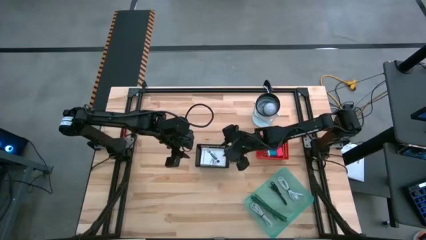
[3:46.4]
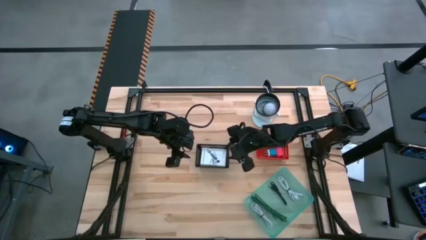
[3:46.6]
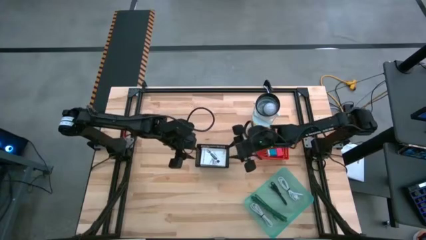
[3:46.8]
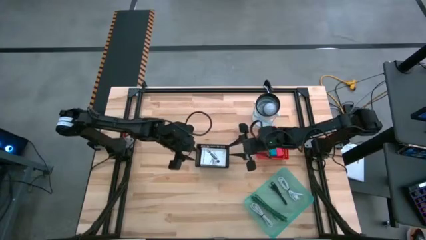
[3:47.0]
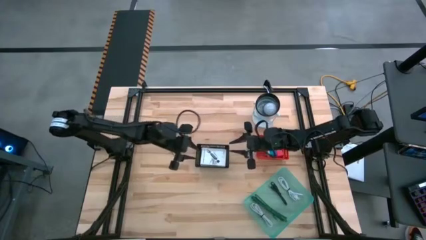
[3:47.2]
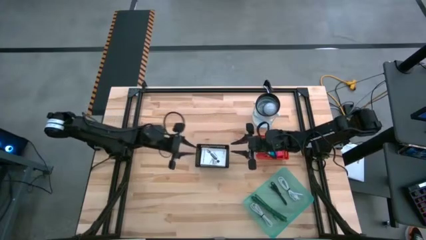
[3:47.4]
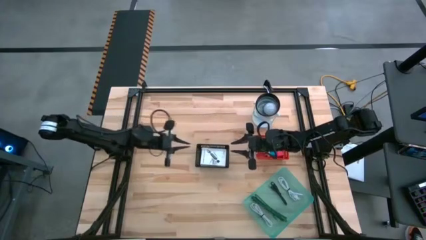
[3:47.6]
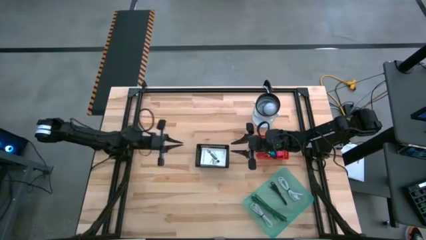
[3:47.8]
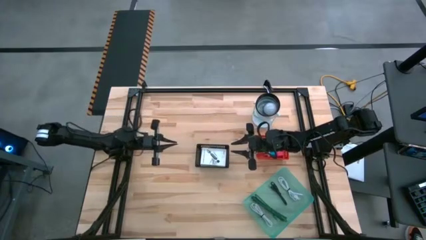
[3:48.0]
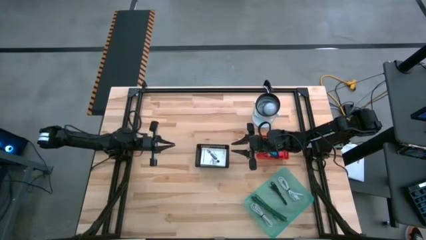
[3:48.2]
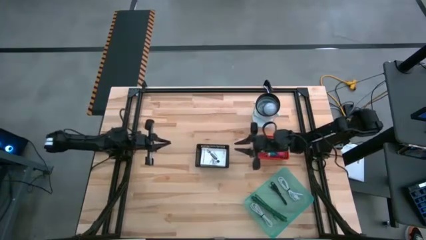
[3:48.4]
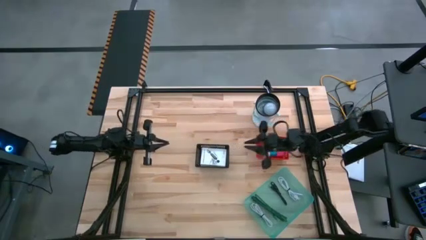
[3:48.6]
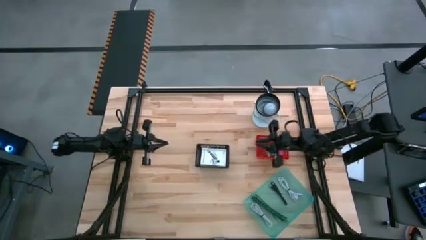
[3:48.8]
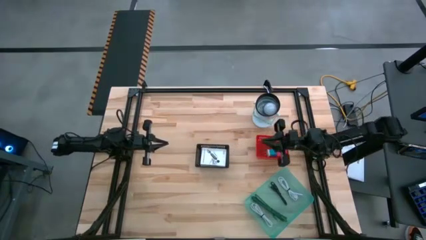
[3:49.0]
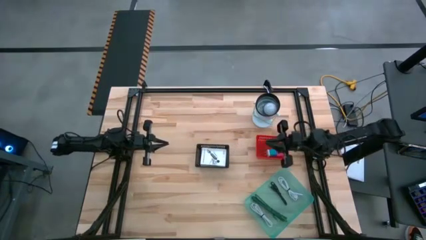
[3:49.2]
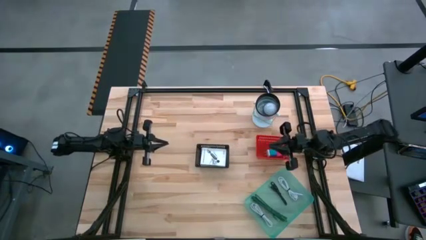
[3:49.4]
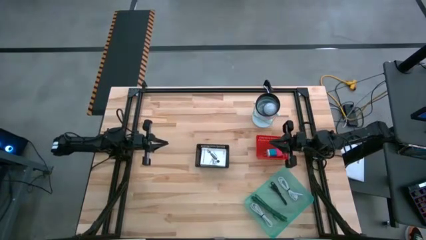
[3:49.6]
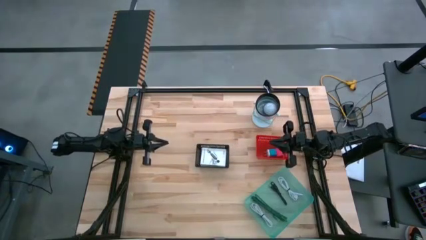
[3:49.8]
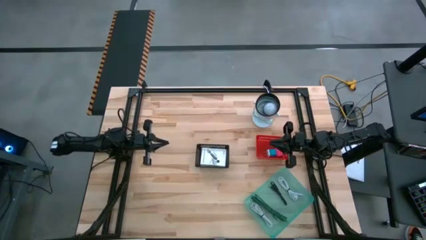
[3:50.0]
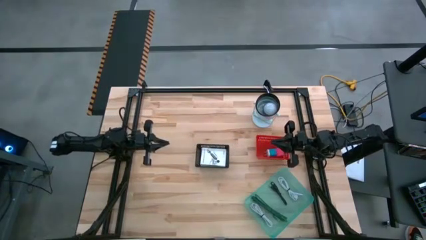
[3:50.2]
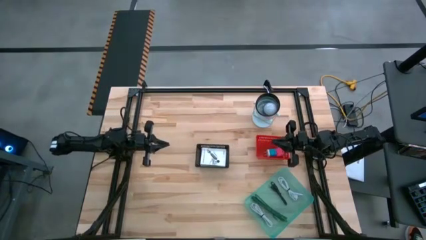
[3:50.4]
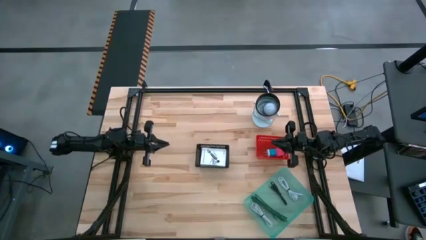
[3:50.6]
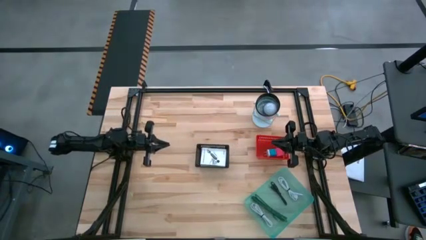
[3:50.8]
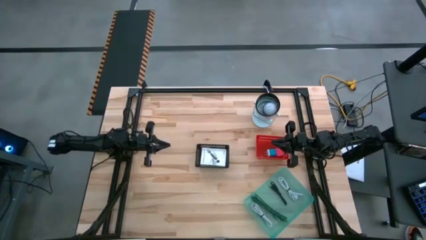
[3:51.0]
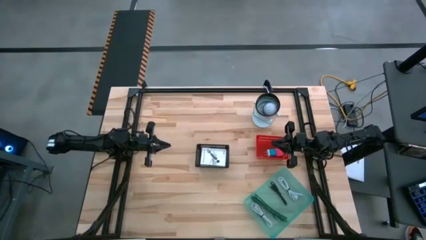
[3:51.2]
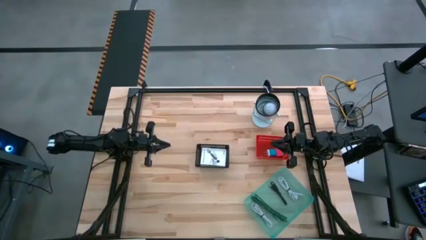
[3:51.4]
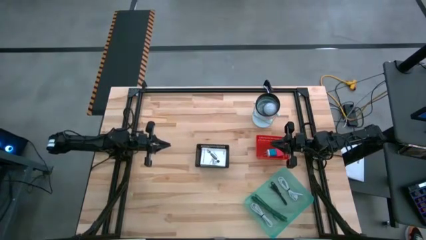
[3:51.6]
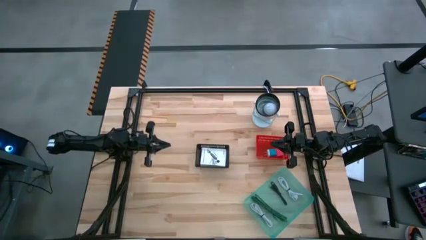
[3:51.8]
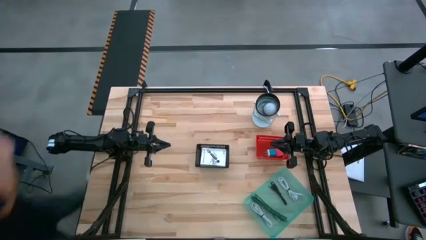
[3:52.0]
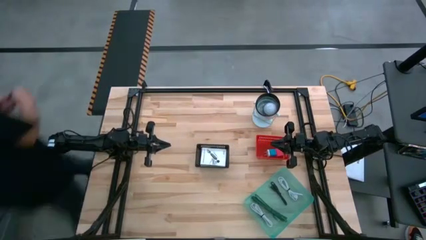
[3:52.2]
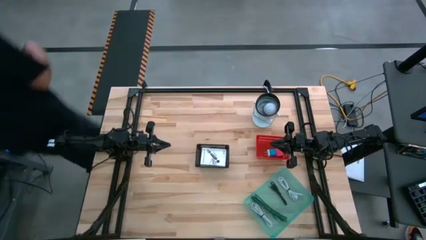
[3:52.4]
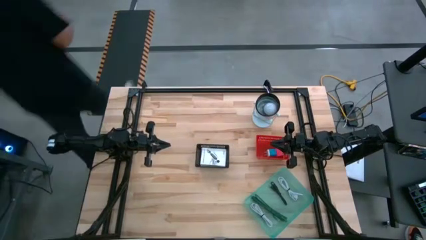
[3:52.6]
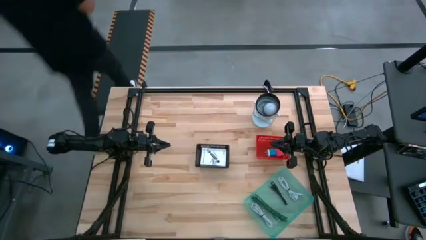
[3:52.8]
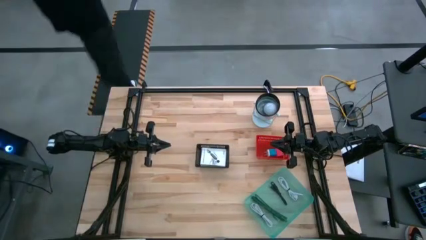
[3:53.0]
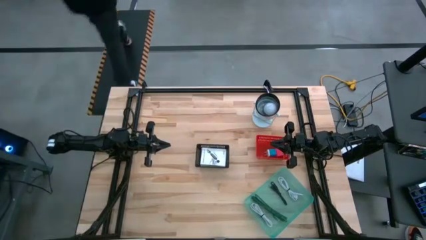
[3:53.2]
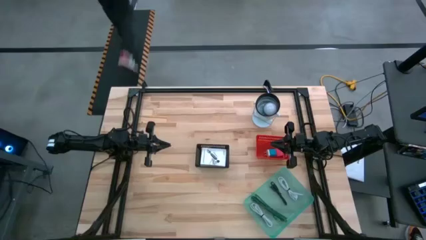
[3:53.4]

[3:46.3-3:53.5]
Task: Pick and place items into bin
Return to Home Position

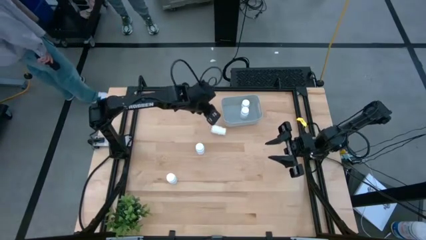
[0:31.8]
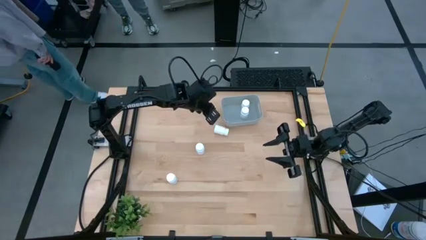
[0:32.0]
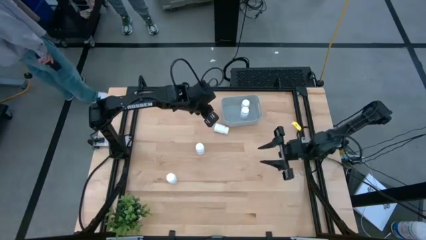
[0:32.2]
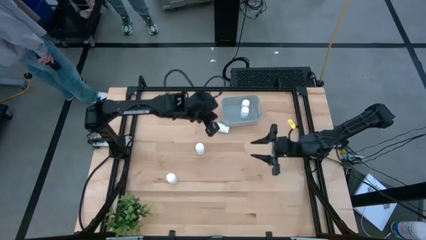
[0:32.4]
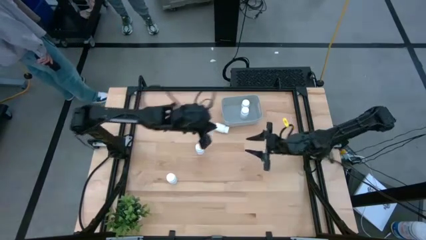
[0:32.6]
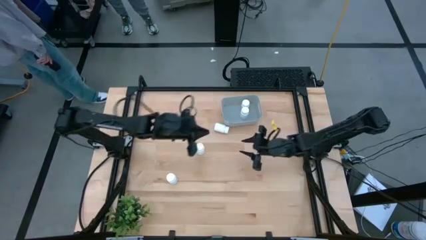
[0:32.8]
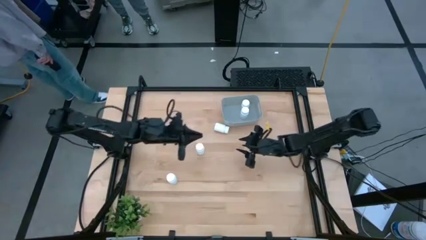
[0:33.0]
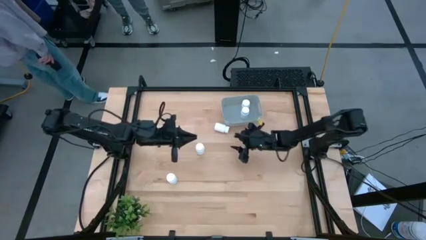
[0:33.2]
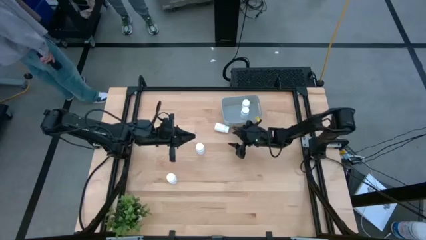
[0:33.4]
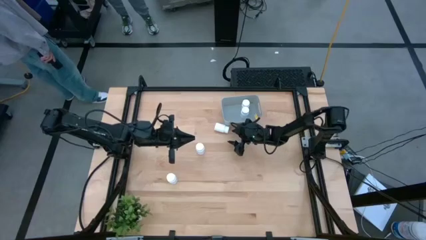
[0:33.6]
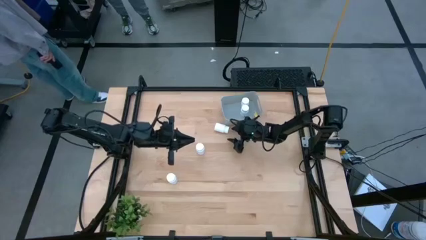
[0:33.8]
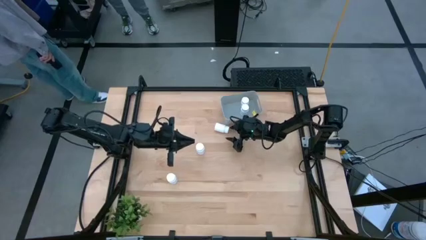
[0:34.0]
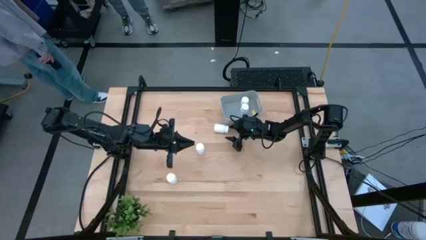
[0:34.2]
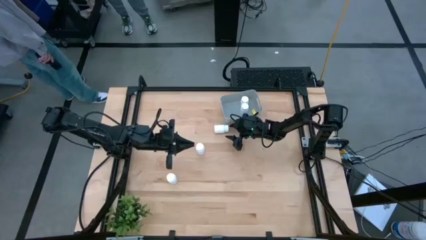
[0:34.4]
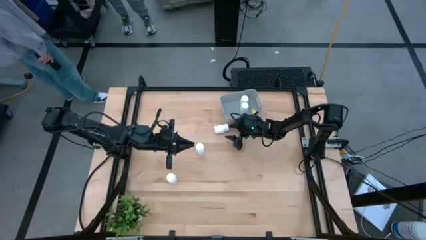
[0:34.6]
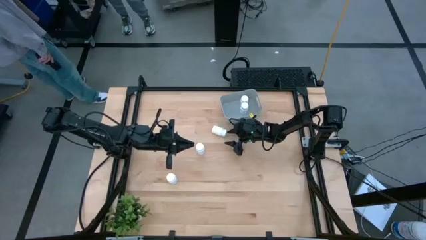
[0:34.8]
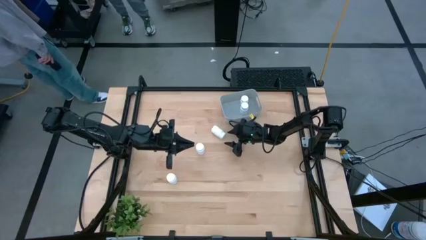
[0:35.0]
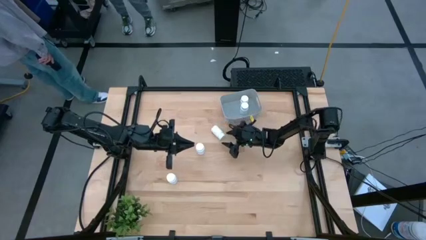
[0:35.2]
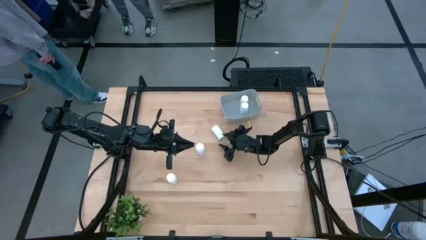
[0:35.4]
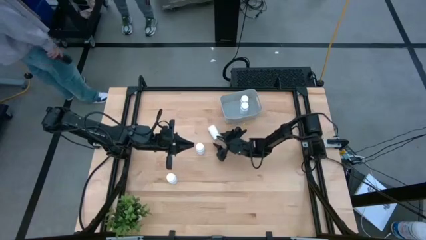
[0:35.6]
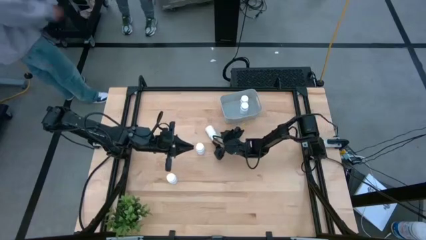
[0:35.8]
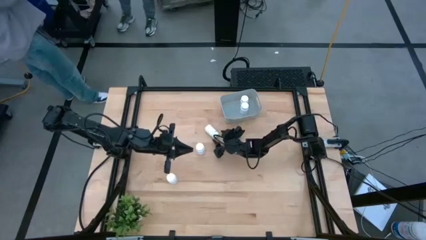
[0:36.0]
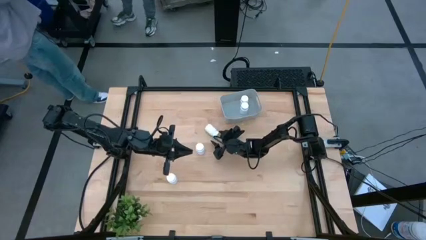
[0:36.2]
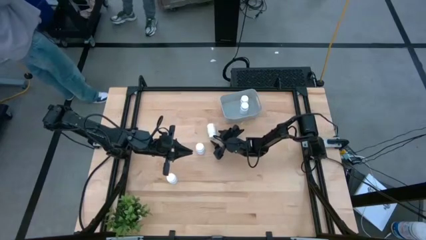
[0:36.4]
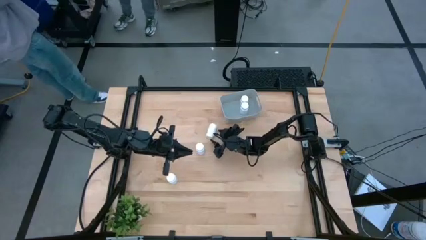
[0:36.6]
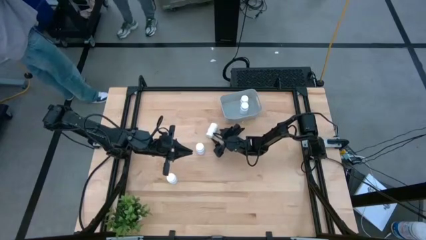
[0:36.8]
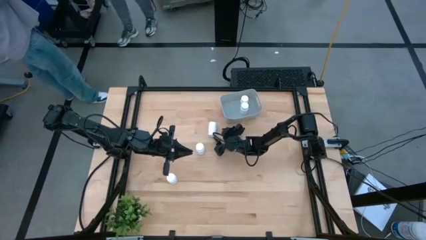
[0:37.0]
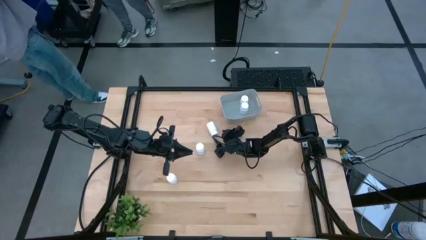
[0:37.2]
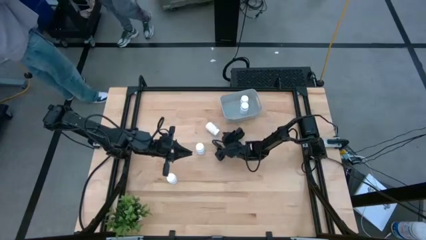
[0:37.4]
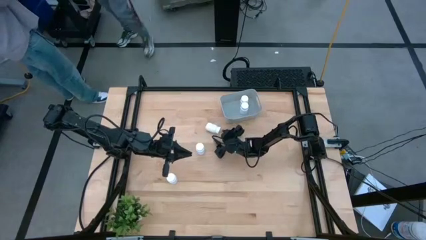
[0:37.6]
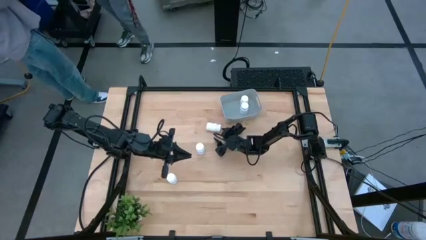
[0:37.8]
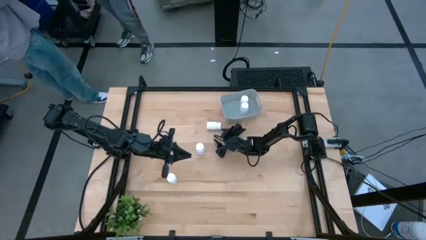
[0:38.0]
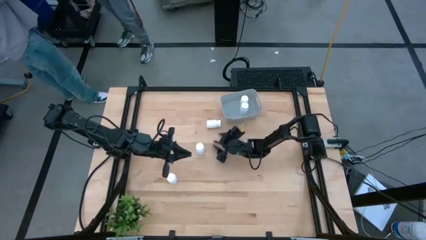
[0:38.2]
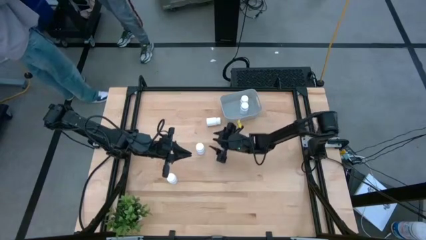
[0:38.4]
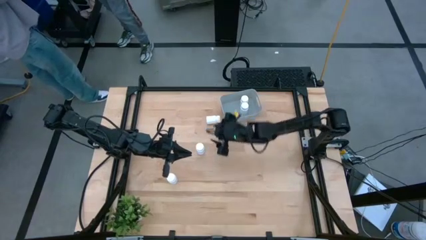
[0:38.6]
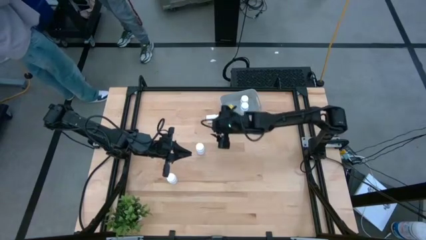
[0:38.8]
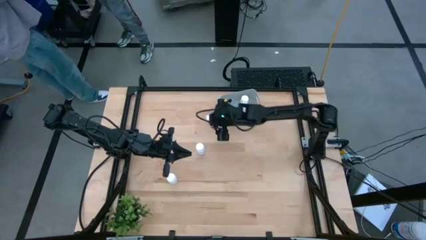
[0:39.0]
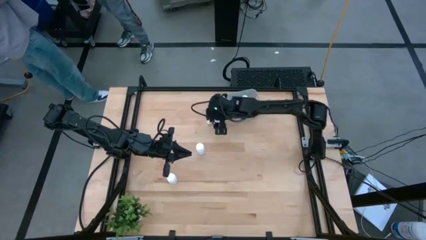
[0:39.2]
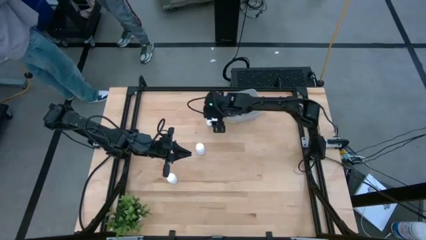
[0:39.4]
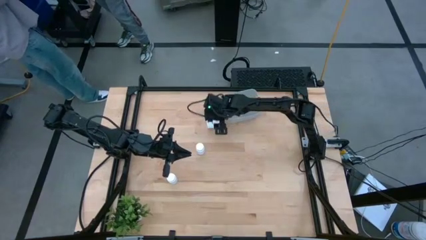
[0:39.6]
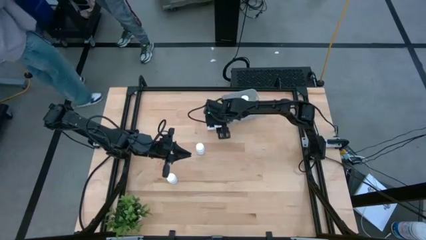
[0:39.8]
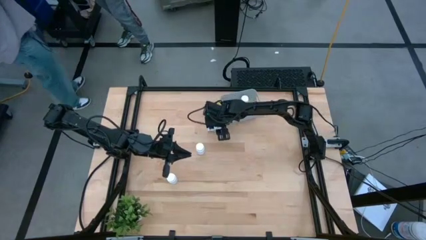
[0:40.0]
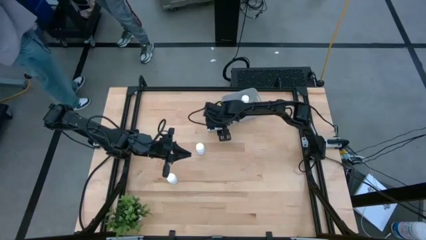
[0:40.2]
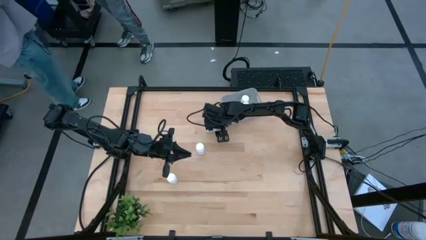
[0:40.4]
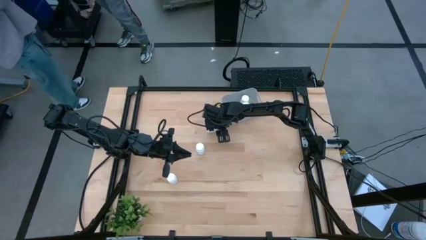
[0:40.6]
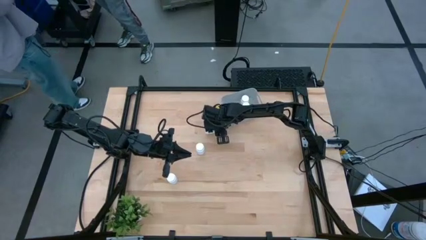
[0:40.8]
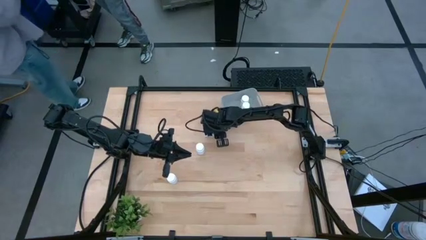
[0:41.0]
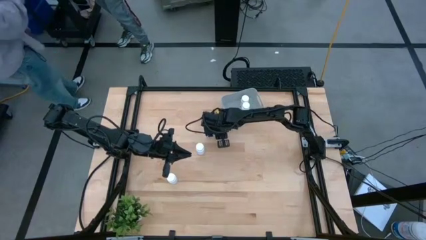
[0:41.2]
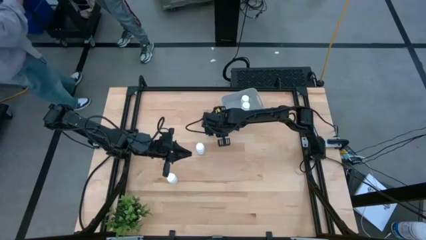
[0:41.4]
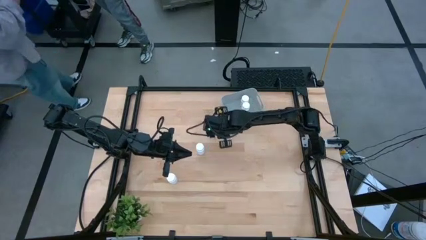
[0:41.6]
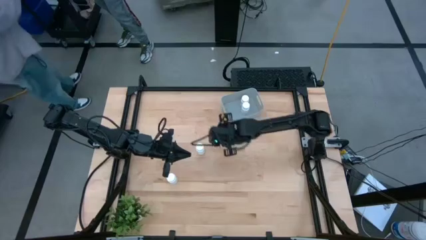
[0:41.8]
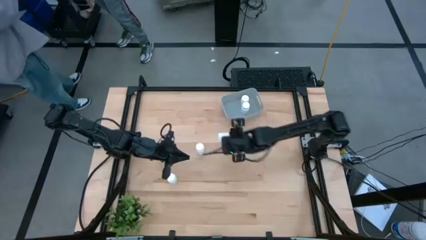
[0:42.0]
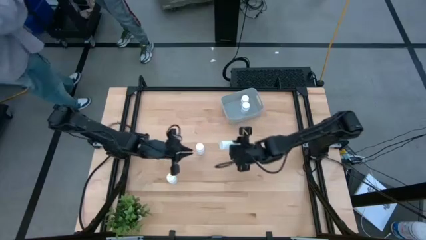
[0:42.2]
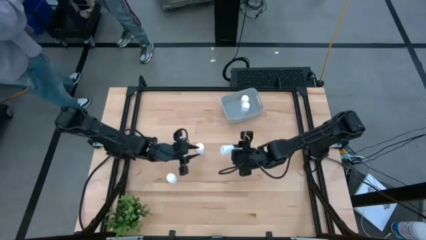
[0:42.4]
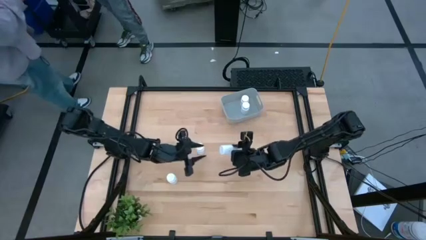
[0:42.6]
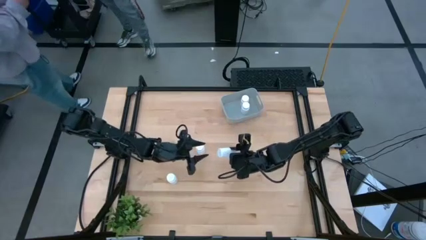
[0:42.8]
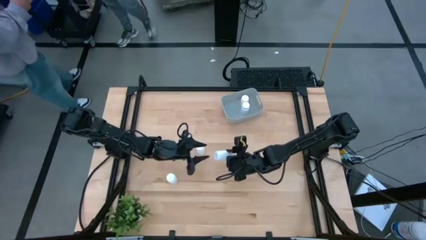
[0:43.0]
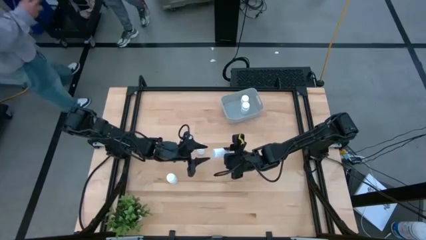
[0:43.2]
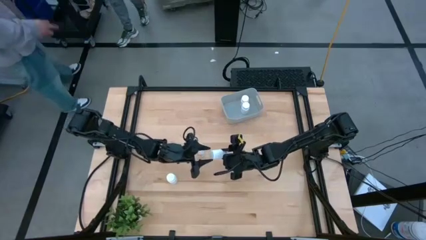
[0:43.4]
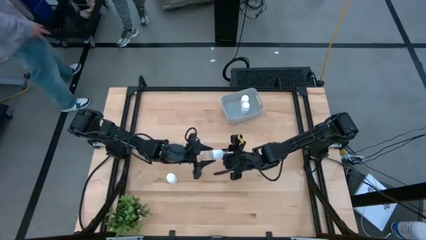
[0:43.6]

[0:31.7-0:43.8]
Task: Pick and place pill bottles into a basket
Put the white medicine bottle into the gray bin
